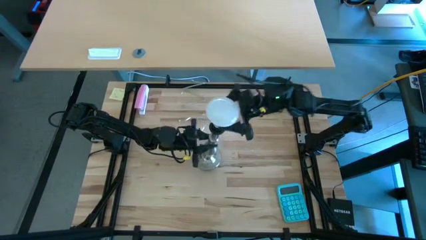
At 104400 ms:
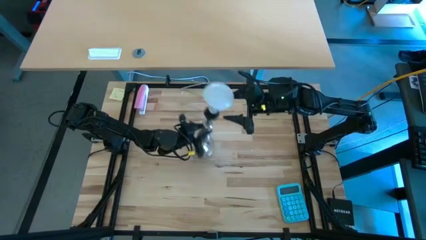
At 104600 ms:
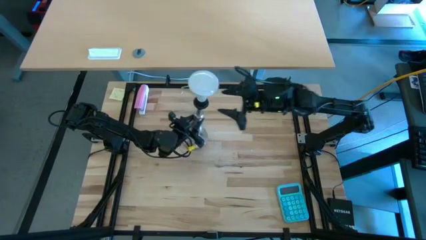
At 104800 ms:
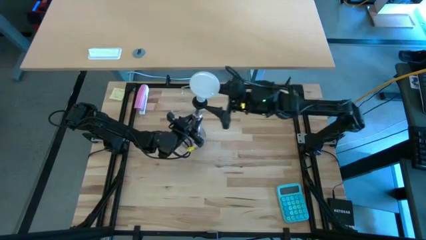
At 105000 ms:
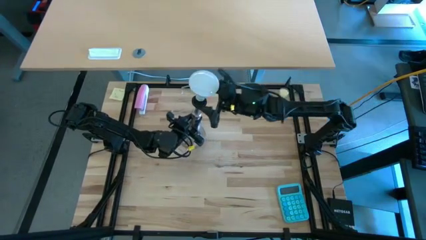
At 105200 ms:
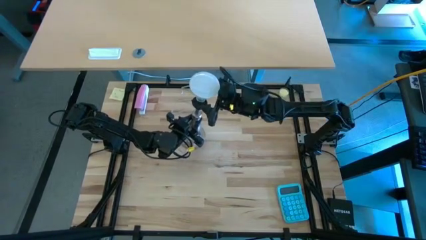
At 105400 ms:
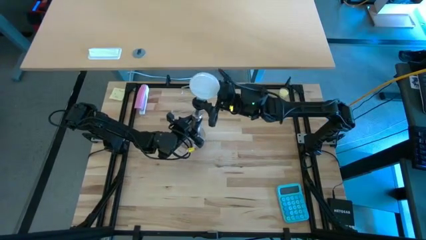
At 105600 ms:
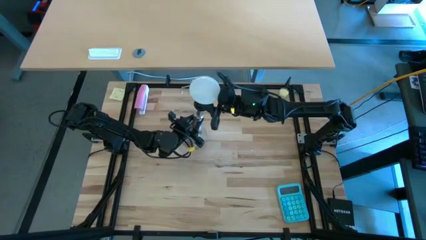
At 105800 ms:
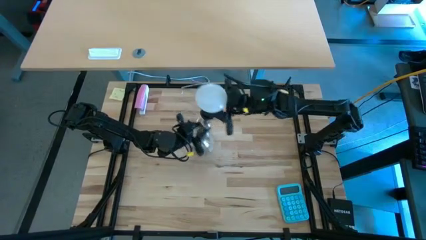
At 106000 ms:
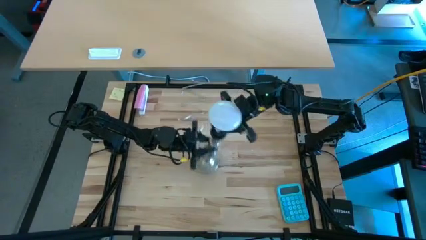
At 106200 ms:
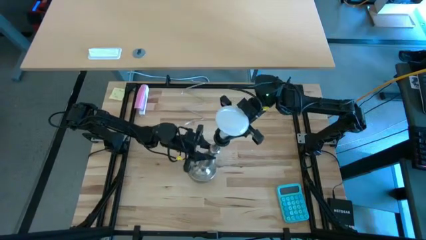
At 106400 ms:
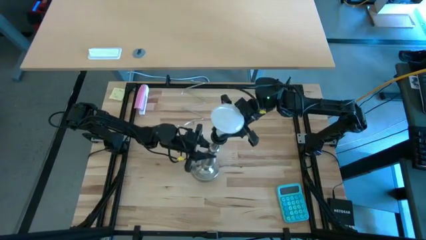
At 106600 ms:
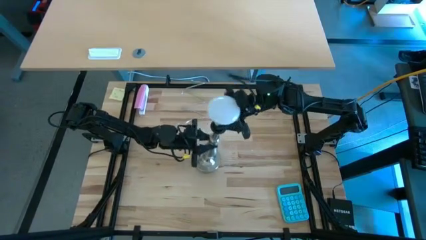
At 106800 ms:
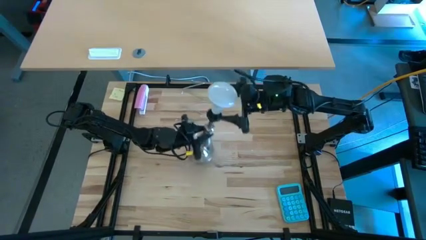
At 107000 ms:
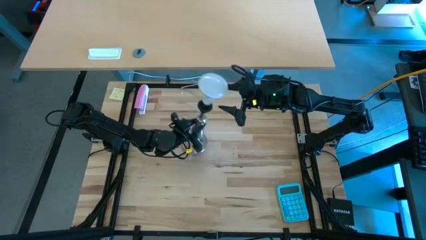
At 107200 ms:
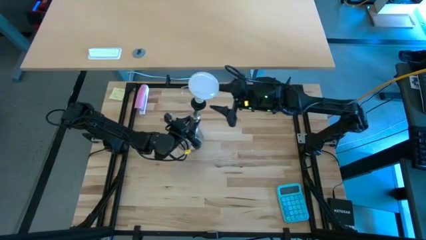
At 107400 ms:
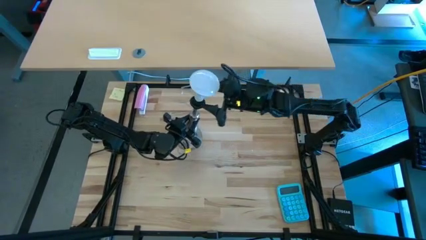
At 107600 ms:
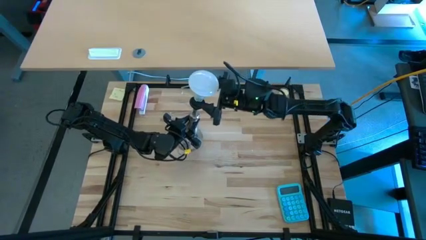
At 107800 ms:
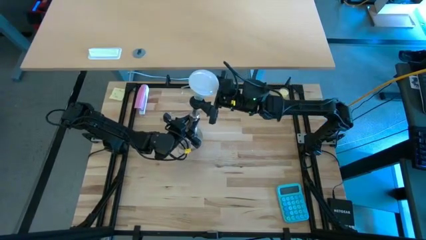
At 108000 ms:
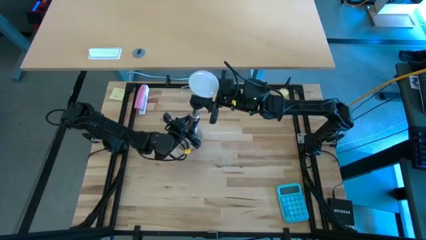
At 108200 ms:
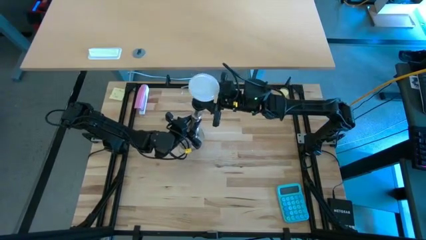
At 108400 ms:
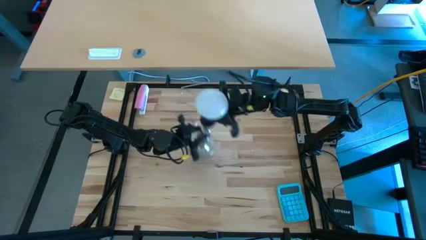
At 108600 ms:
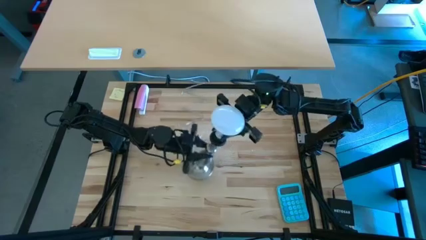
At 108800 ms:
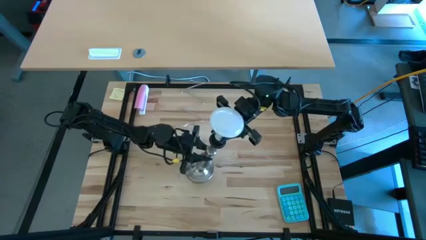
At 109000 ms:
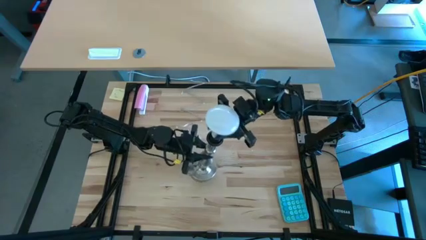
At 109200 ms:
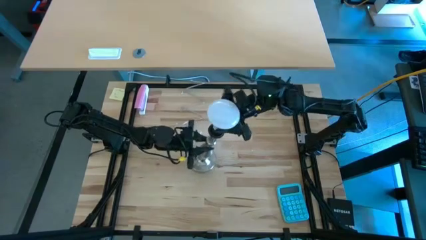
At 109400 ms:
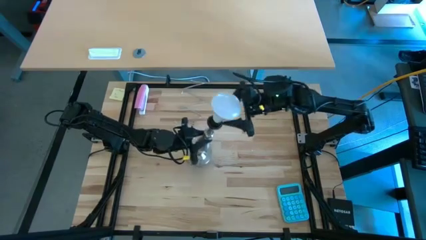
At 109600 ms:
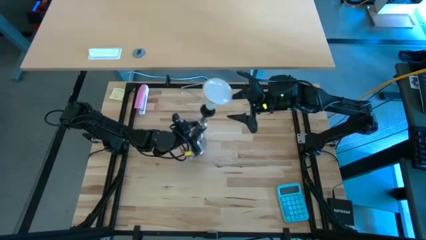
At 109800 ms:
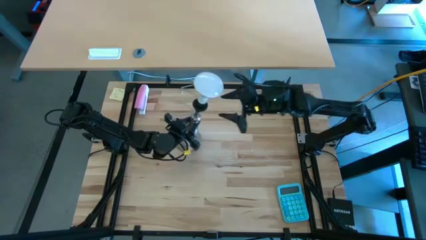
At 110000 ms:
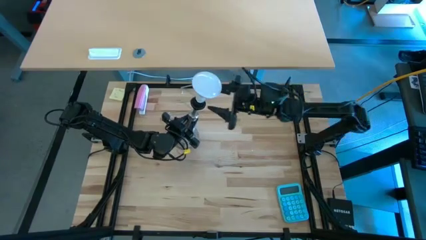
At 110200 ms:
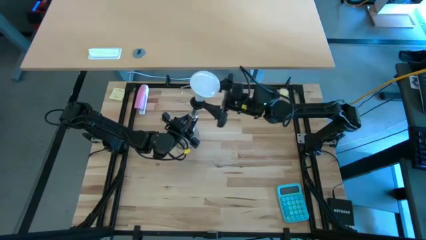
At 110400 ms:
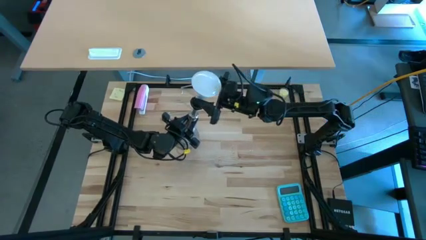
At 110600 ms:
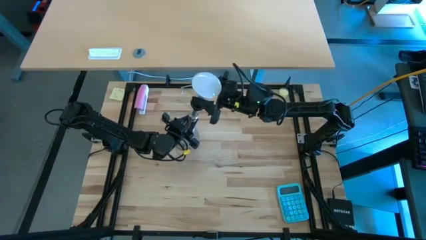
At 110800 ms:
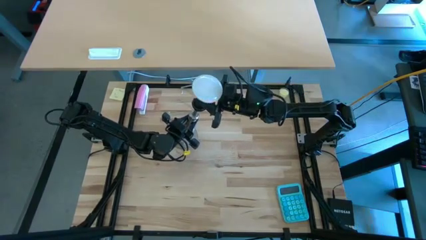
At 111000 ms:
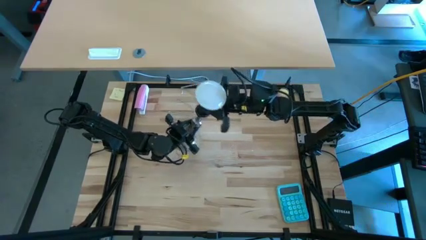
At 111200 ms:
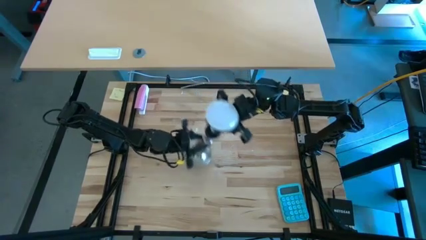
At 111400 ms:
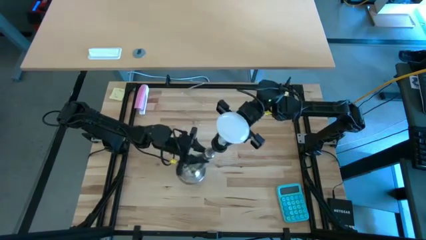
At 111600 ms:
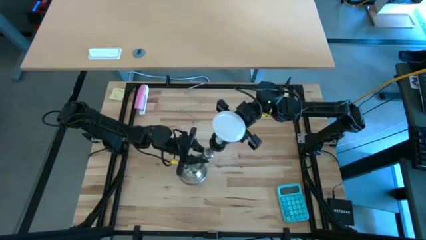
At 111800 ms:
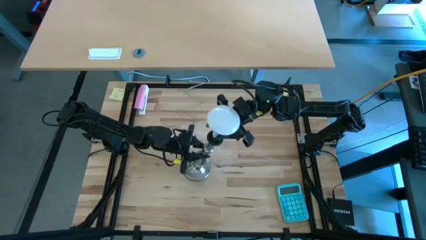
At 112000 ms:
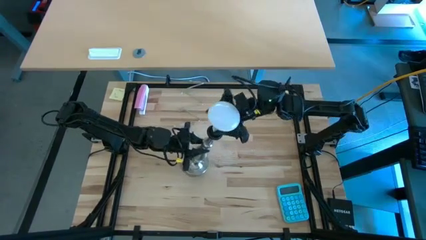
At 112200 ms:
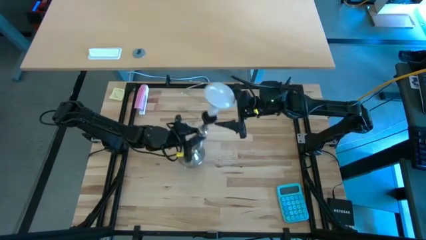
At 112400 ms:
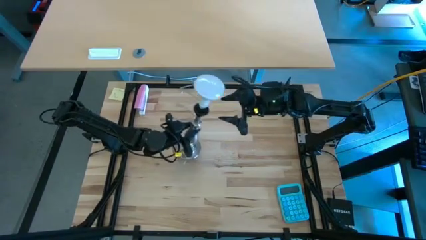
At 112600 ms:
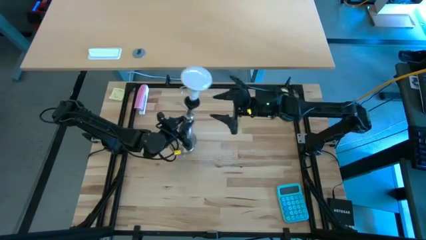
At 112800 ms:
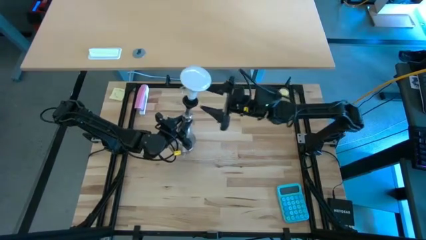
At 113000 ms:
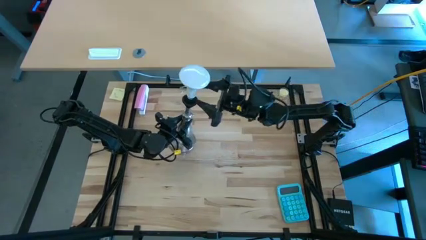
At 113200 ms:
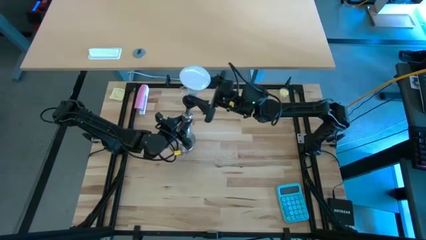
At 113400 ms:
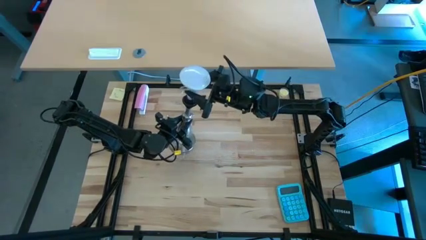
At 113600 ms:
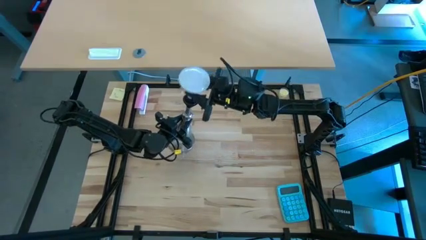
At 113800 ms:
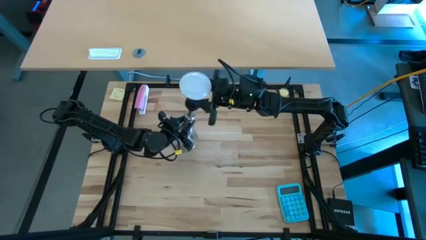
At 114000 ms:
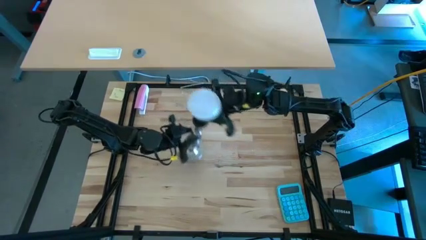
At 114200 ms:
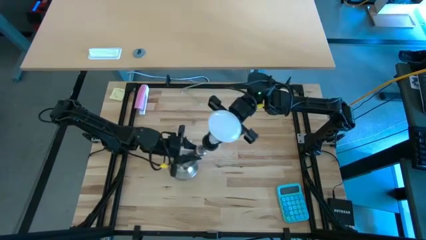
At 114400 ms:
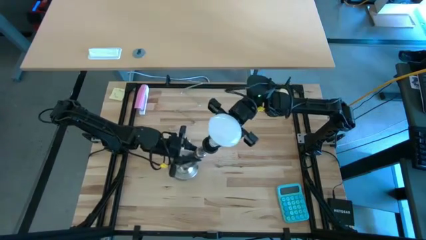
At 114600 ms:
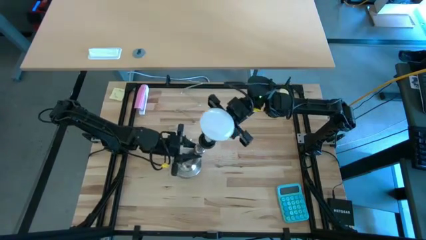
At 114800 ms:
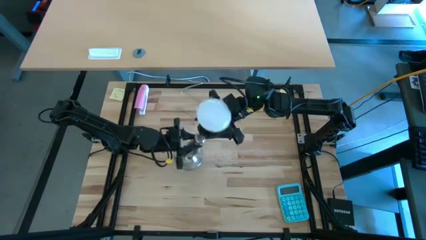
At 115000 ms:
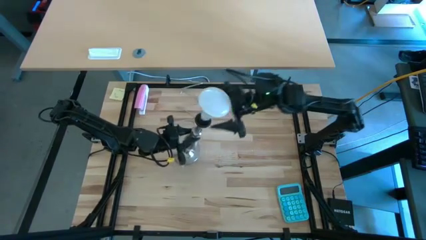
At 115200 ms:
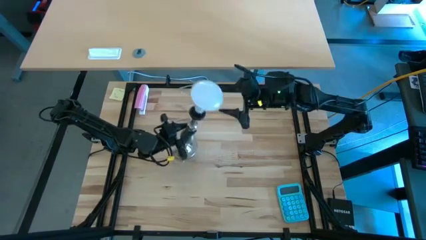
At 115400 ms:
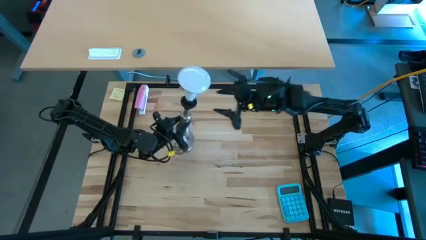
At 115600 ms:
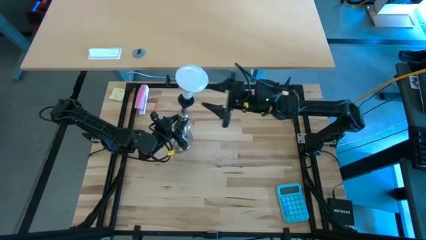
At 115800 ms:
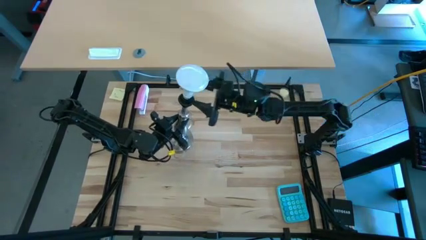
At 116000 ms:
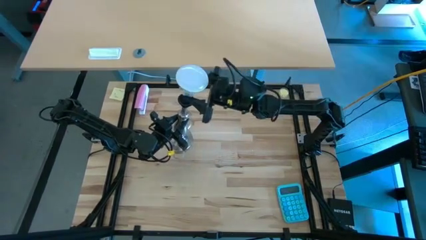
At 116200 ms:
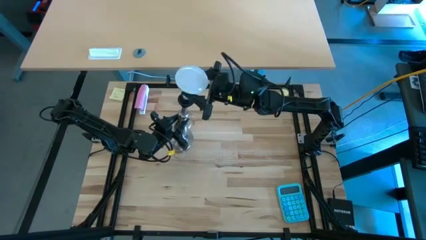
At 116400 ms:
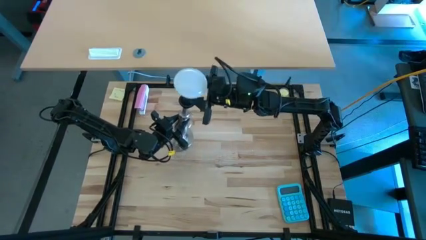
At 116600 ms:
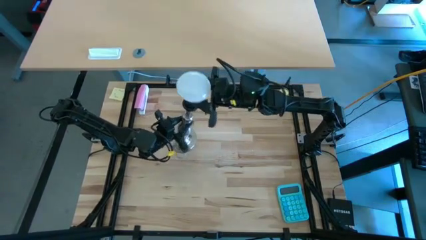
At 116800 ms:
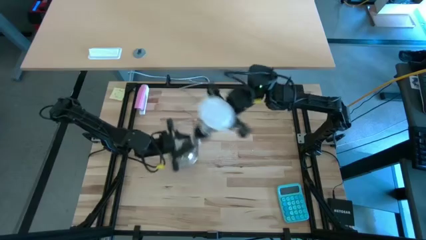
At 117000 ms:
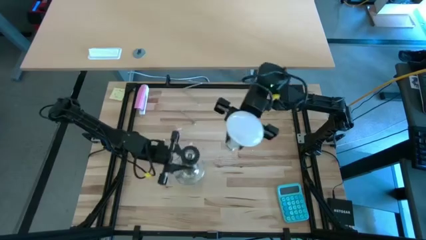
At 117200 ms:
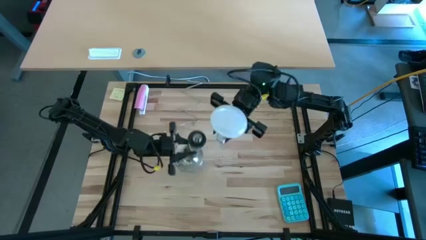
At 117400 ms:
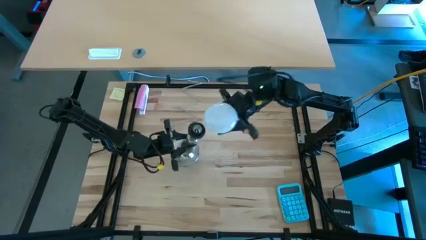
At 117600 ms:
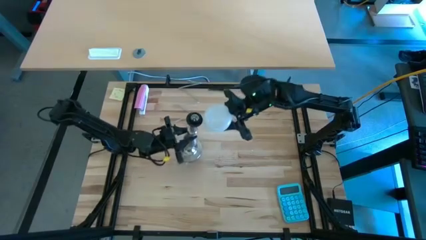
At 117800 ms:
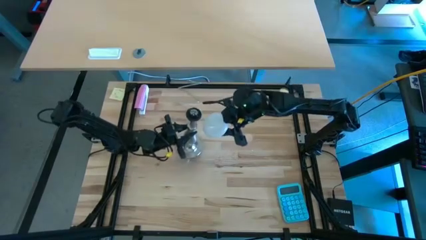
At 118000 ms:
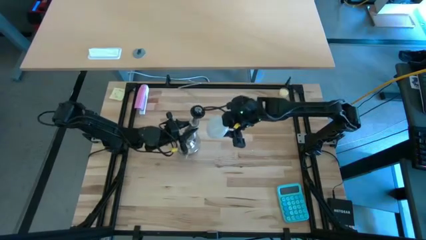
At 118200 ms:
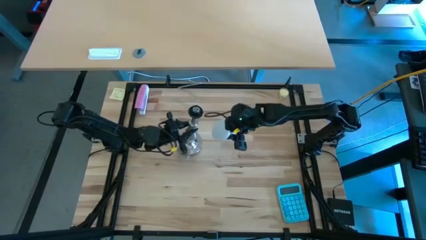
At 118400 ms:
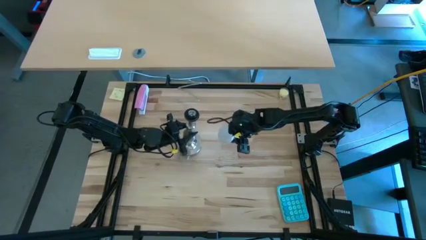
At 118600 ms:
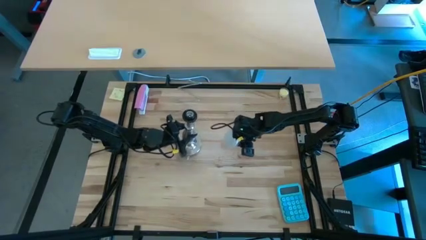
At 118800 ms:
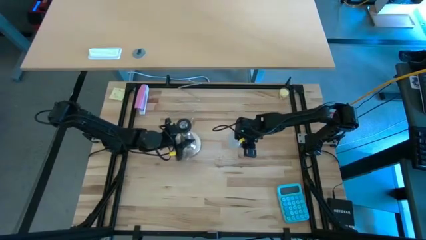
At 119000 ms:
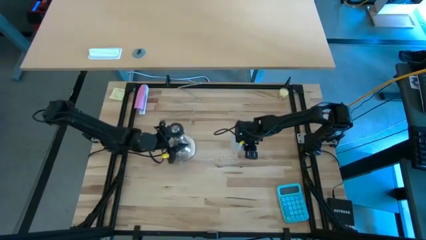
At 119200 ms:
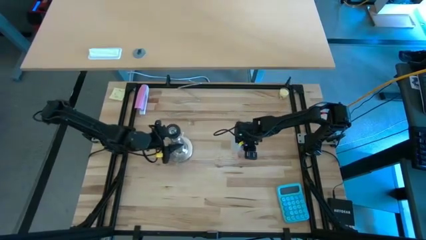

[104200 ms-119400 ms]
Task: Screw lightbulb
Remove the lightbulb from the desk lamp
